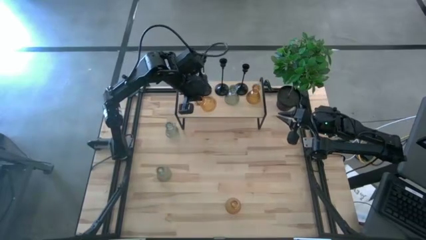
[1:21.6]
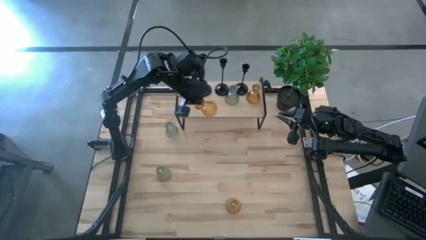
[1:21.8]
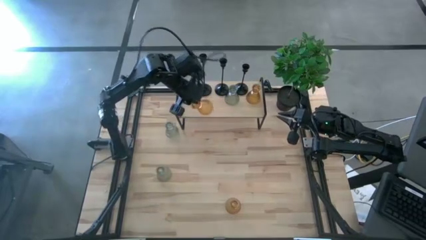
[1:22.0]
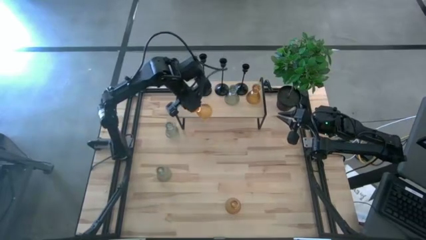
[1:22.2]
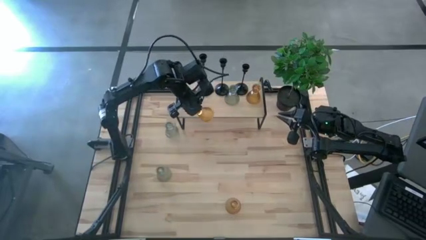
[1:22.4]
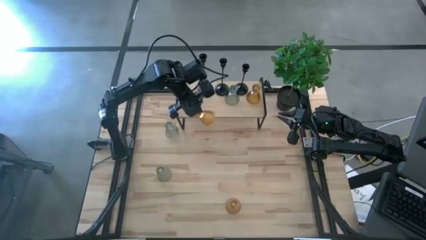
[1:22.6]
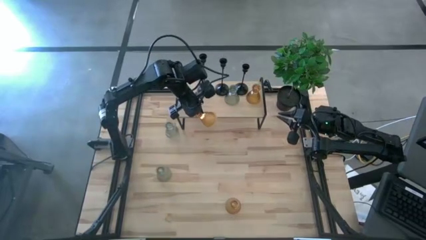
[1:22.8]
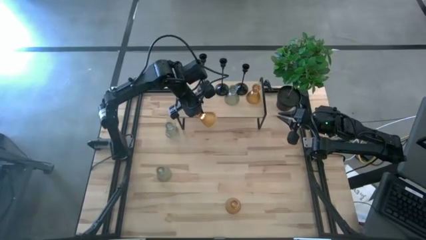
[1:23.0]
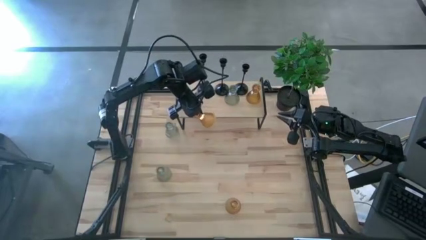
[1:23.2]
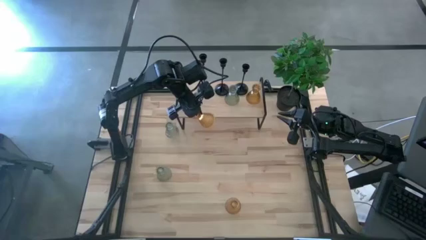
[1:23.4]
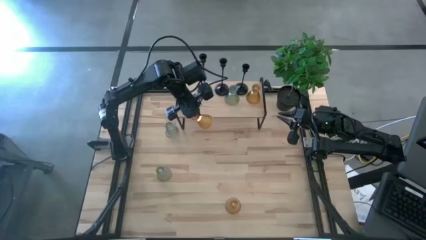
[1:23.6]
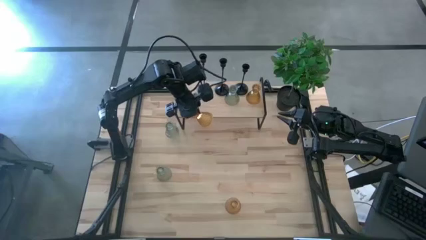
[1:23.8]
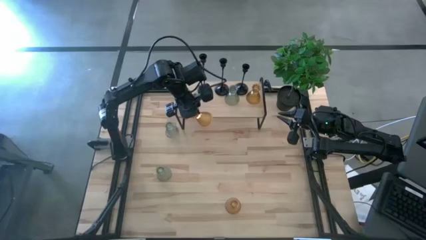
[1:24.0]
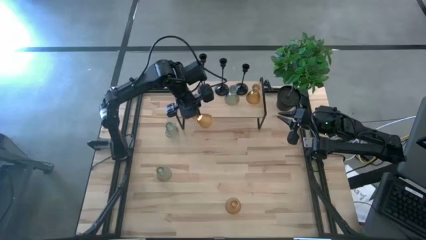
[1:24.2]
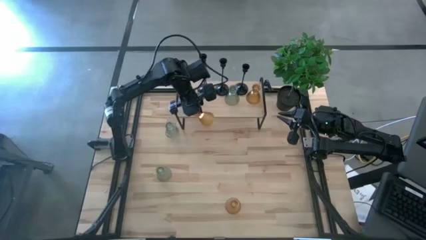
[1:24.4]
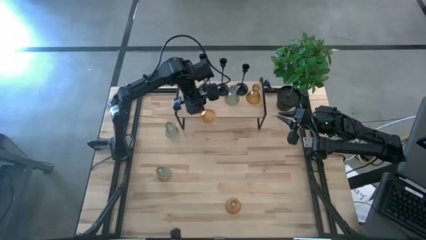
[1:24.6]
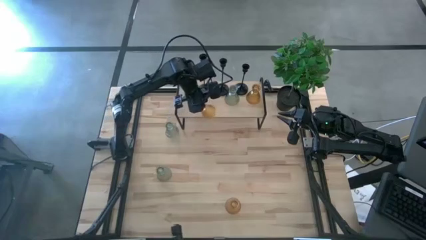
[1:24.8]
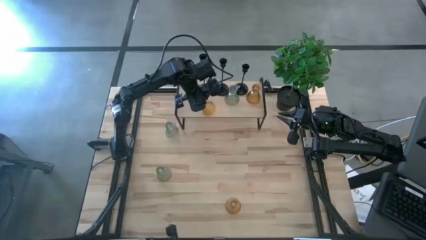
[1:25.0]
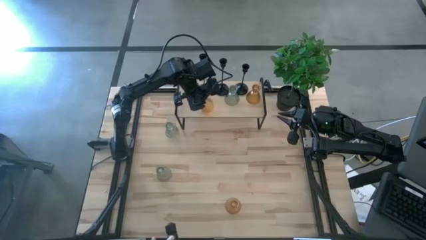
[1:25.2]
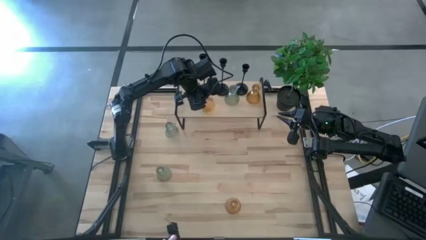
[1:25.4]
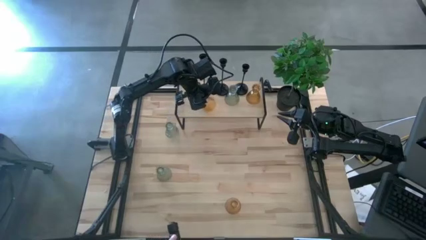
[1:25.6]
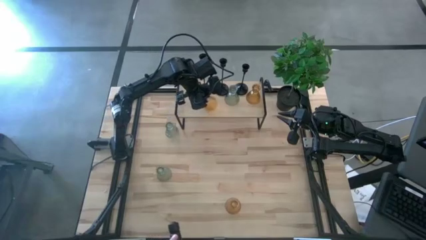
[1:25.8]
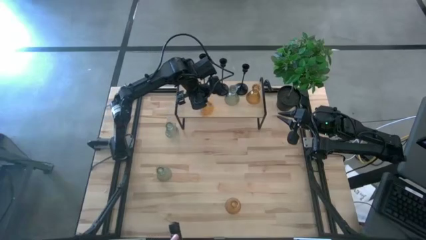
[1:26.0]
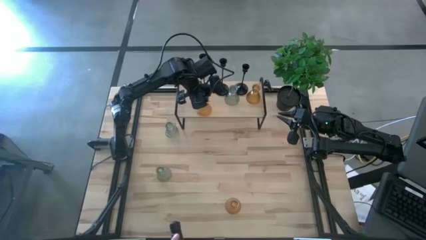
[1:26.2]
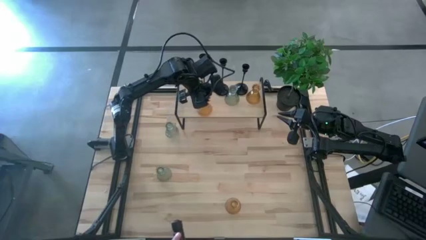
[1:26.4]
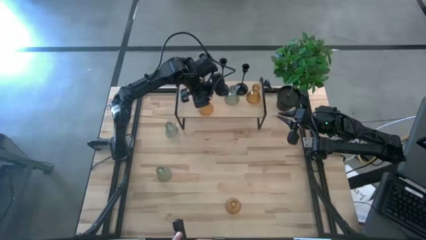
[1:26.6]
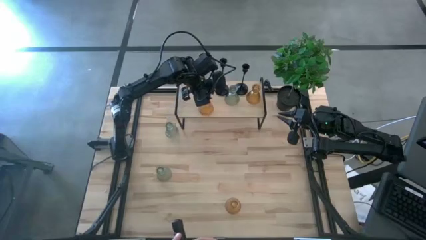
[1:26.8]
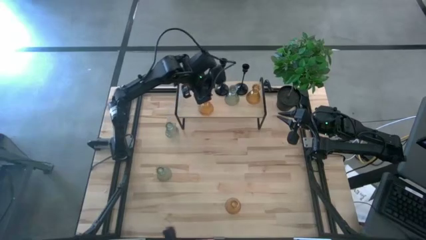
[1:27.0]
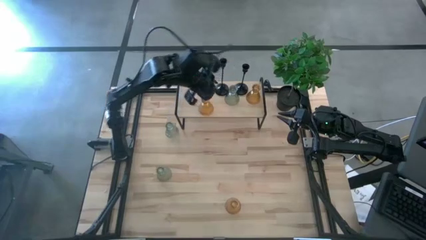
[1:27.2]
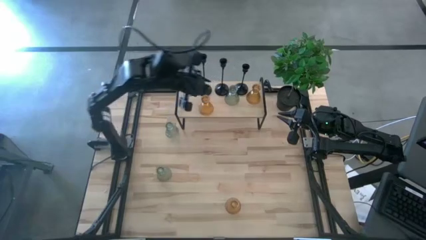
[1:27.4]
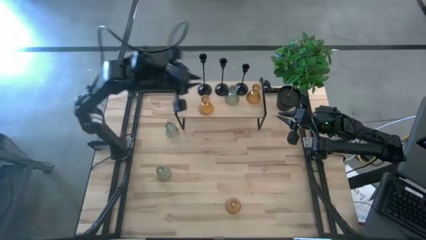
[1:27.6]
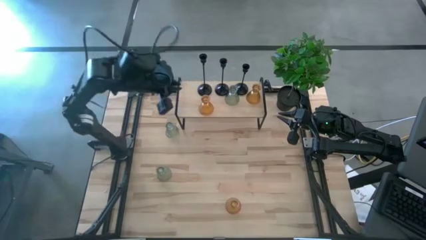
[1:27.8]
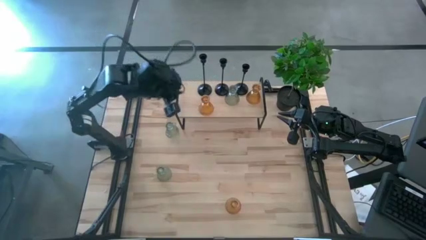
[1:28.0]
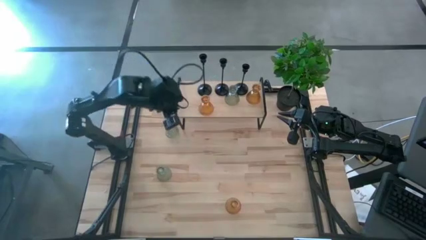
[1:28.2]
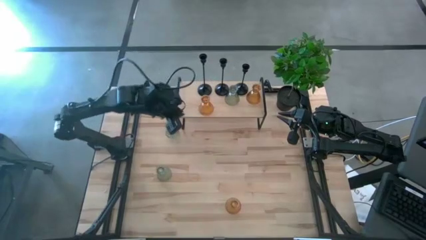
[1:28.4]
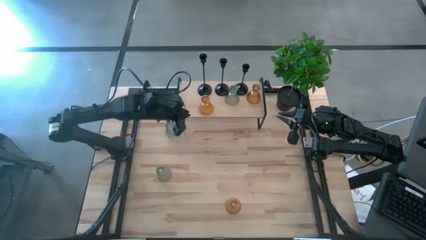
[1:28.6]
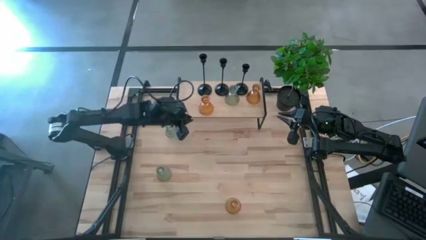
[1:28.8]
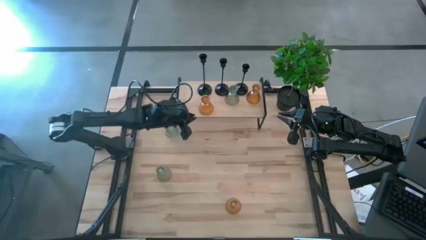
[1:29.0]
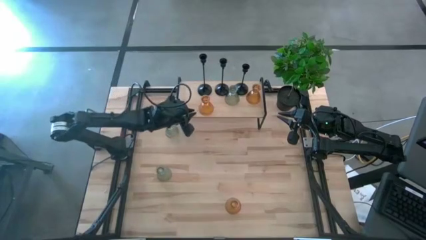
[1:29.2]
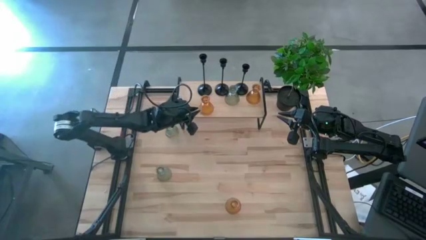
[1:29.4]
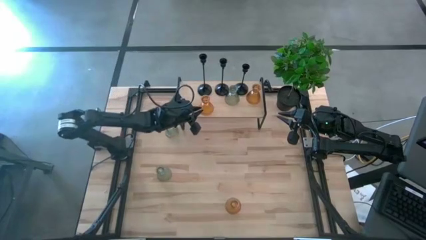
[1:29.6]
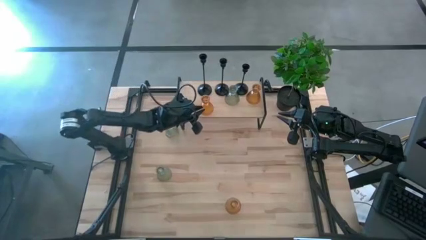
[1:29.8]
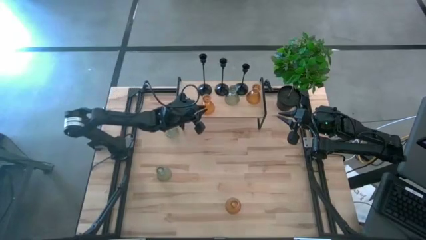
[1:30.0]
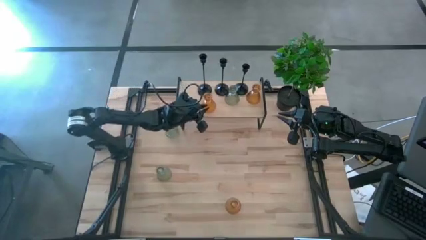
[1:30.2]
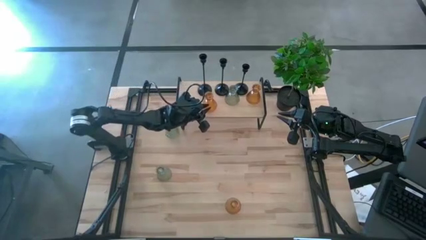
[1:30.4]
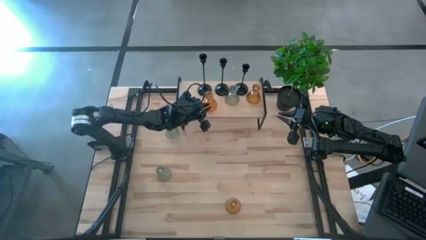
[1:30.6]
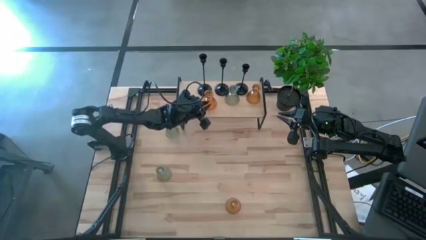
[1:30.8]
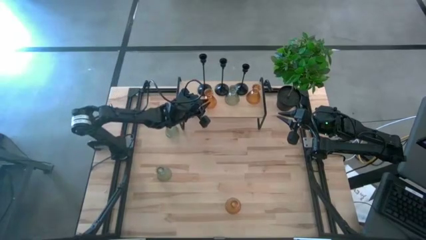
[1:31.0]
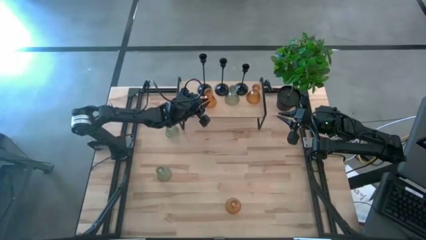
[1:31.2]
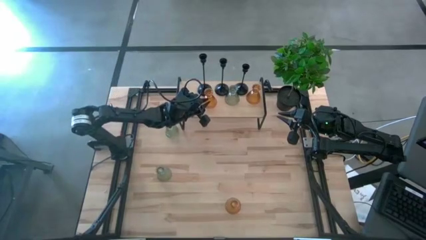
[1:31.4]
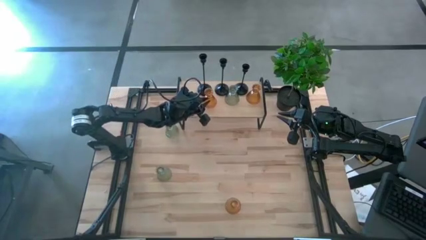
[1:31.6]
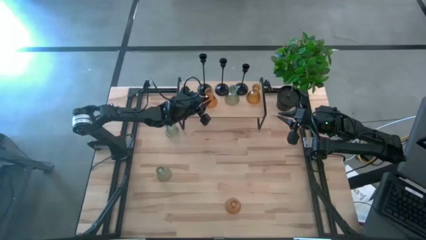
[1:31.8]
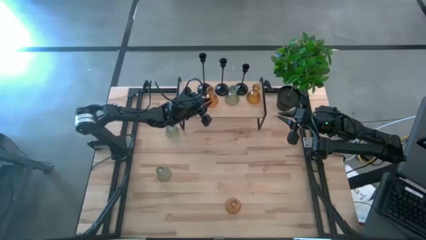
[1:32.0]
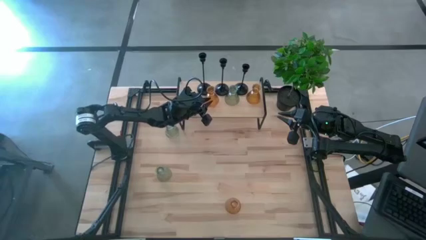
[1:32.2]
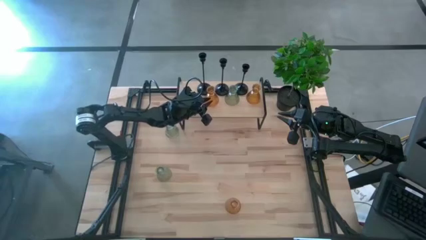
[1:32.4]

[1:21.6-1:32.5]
Task: Pick & Place candle stick holders
Put the left yellow candle holder on the shelf

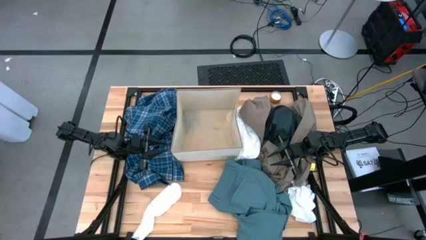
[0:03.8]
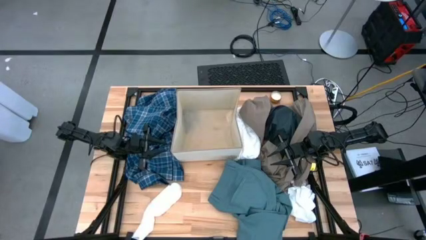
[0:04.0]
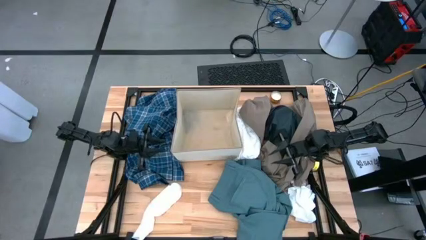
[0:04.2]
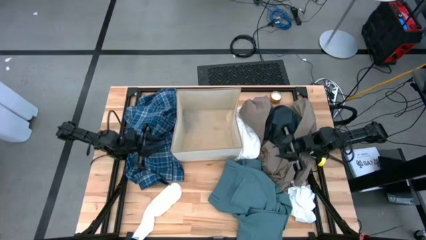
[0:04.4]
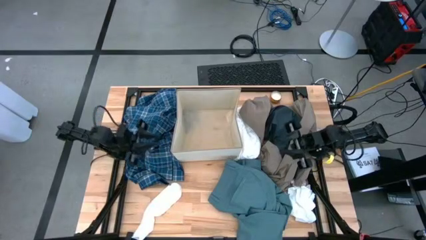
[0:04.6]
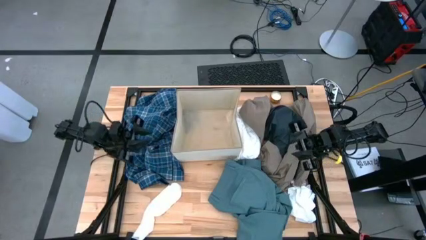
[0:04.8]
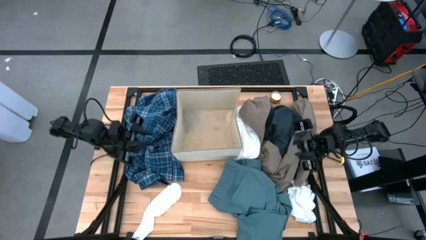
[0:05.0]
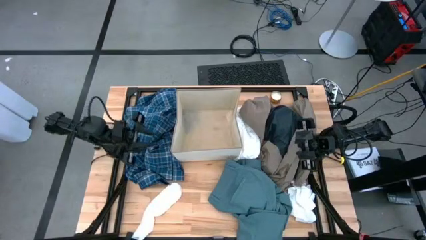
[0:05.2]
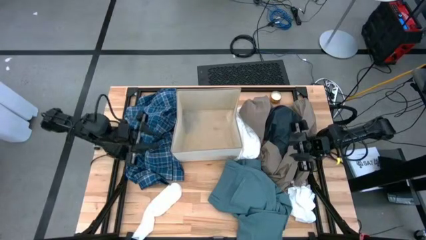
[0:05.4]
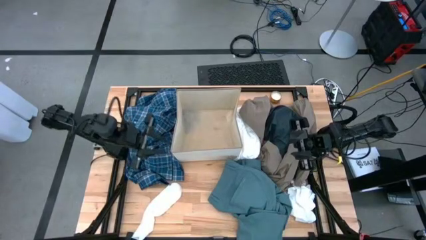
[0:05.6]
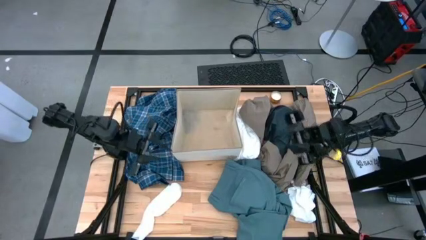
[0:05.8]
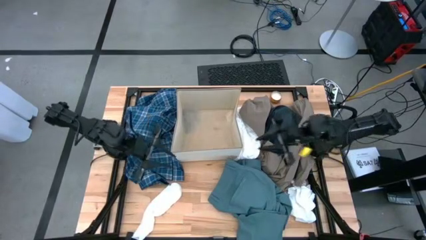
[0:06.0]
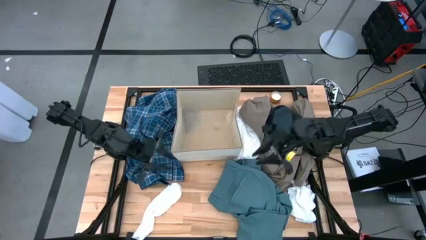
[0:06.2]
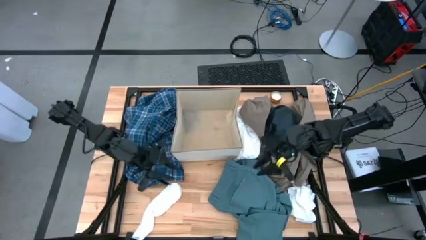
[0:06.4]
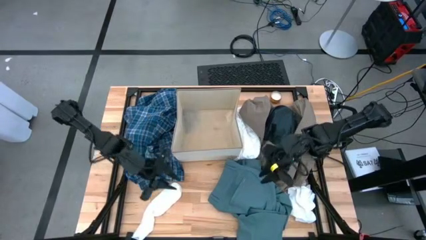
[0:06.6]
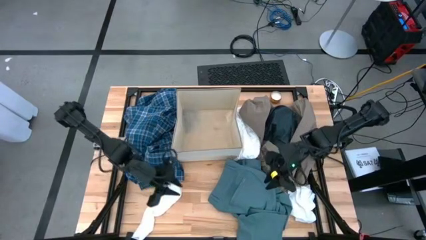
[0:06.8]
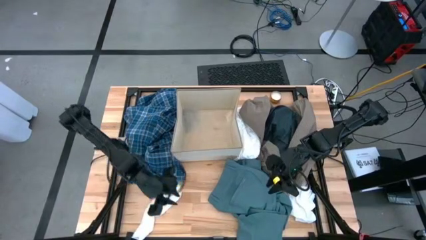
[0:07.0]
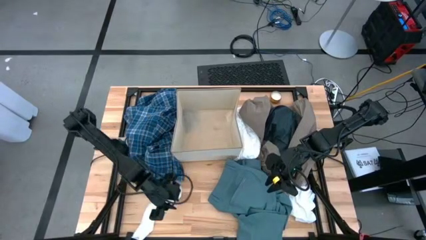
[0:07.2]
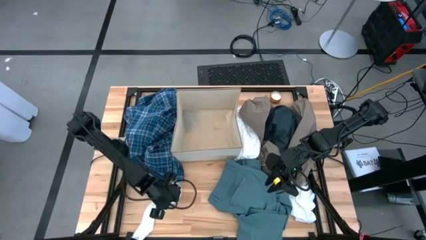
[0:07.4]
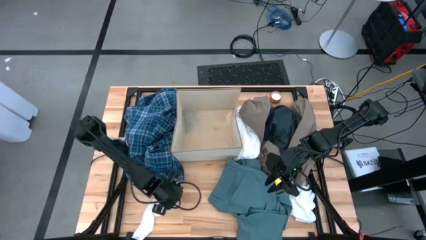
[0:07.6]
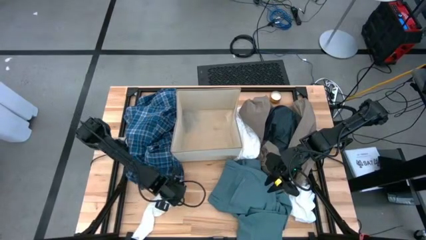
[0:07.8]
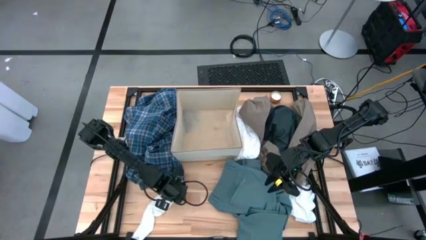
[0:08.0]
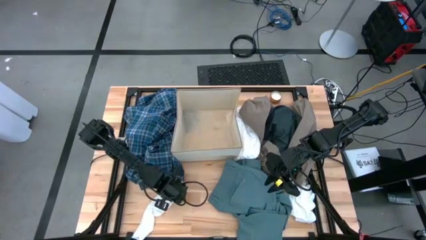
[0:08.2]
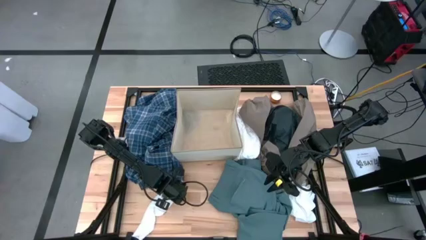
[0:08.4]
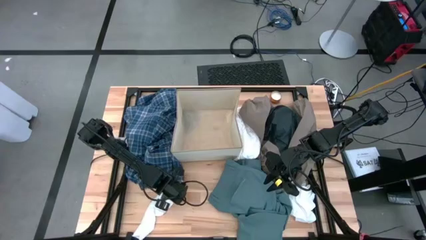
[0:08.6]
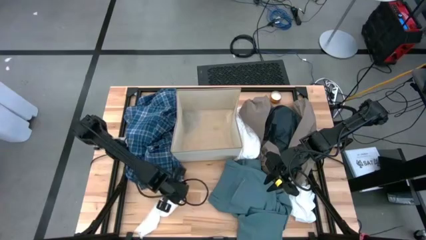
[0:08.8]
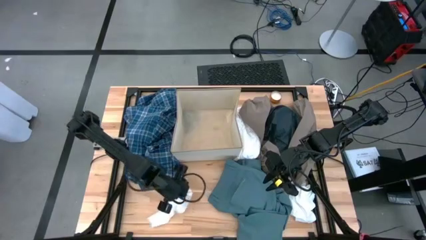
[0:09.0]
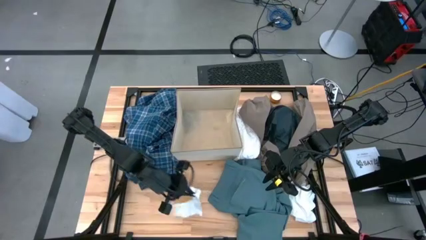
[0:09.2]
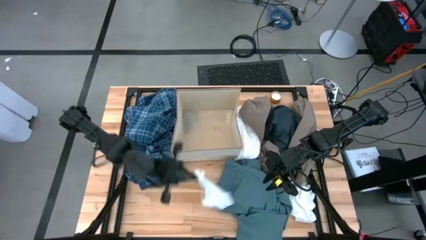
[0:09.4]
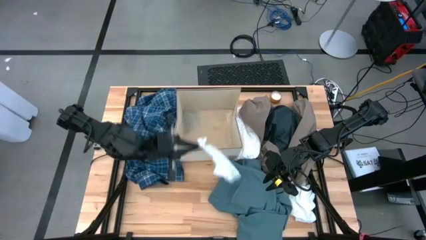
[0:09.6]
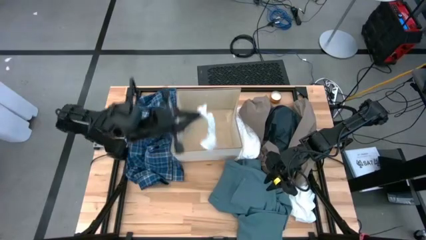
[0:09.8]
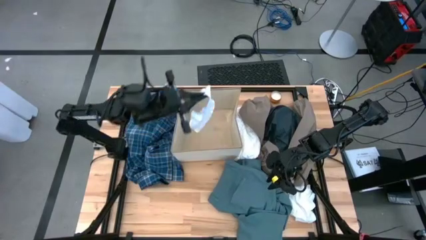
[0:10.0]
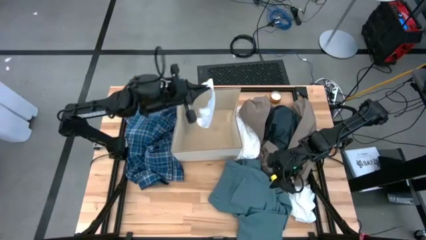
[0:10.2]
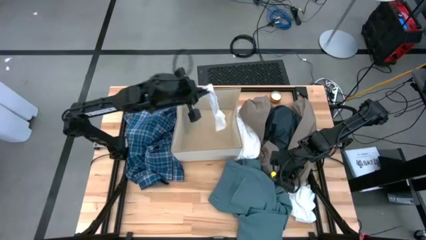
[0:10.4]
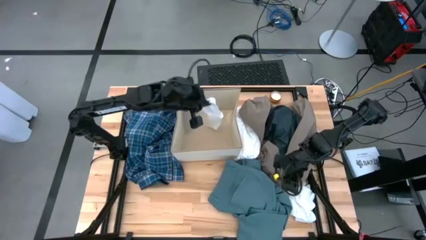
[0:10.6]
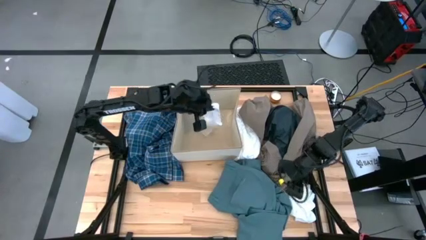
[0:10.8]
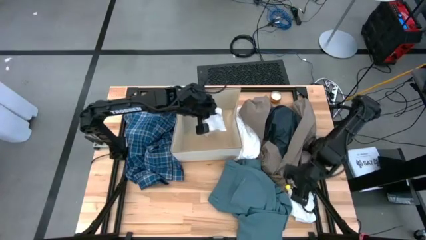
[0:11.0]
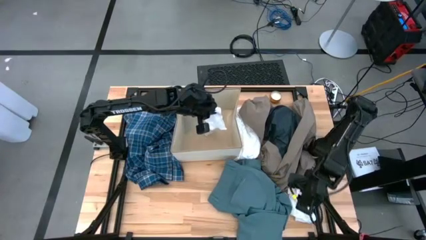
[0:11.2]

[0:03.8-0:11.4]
Task: Sort clothes
Put the white sock into the laundry organizer
